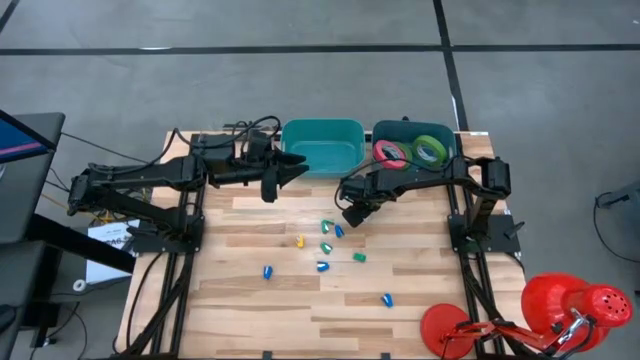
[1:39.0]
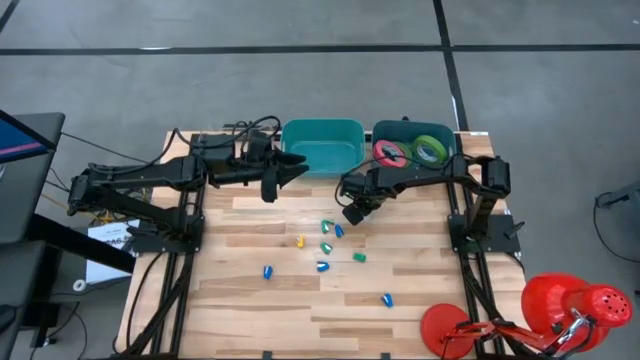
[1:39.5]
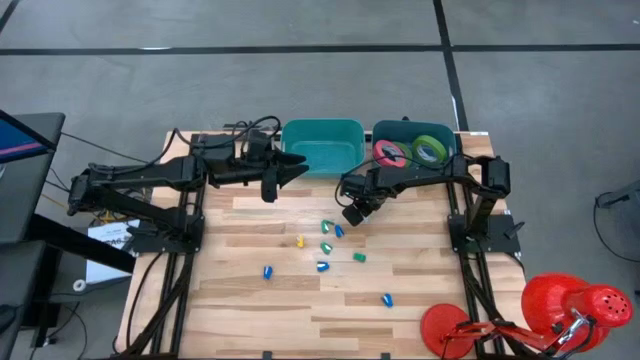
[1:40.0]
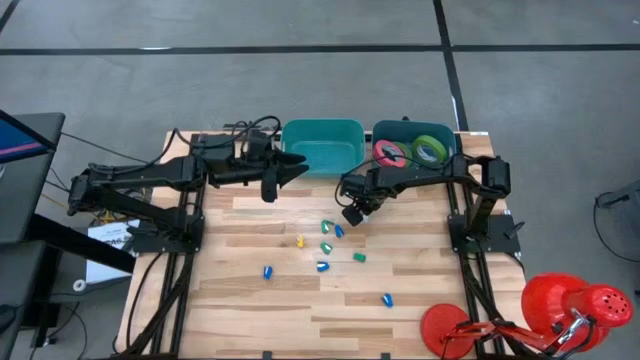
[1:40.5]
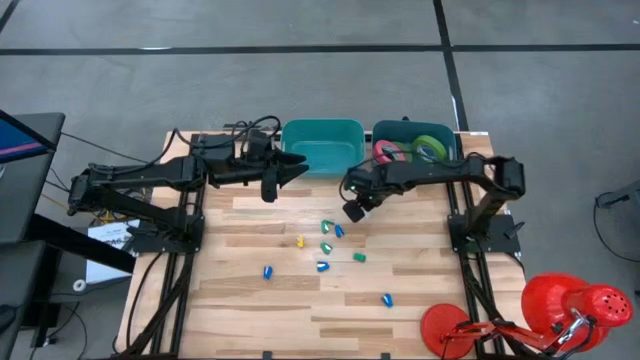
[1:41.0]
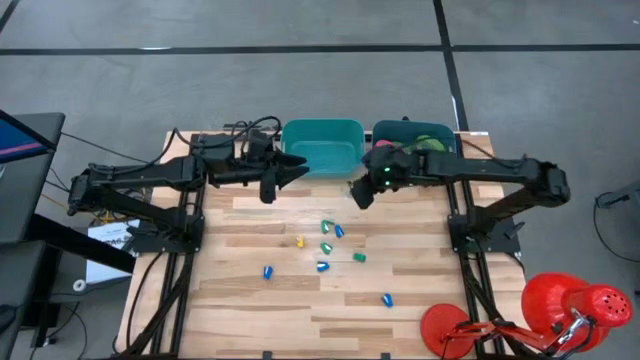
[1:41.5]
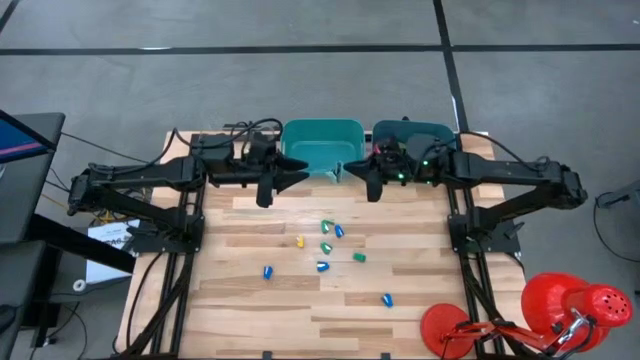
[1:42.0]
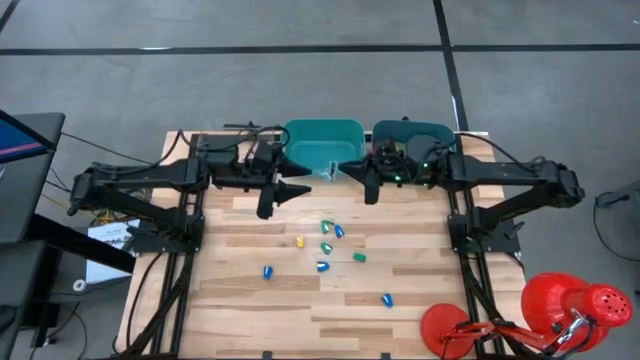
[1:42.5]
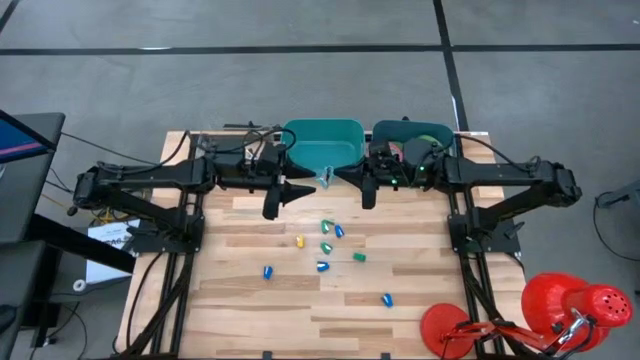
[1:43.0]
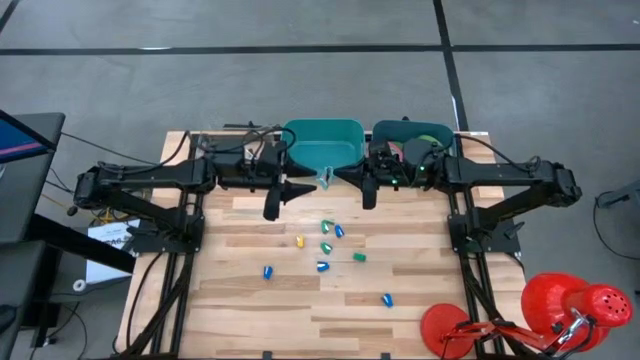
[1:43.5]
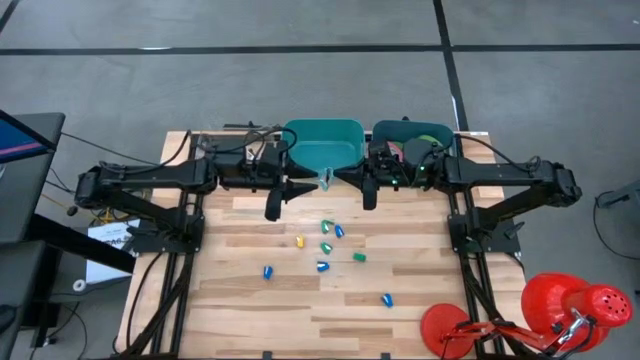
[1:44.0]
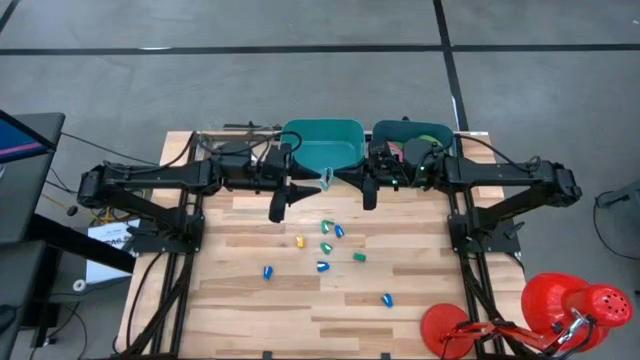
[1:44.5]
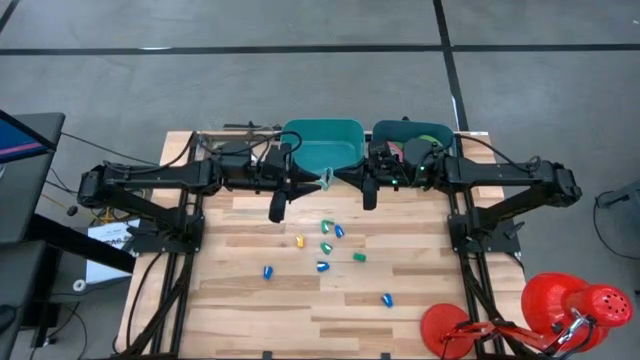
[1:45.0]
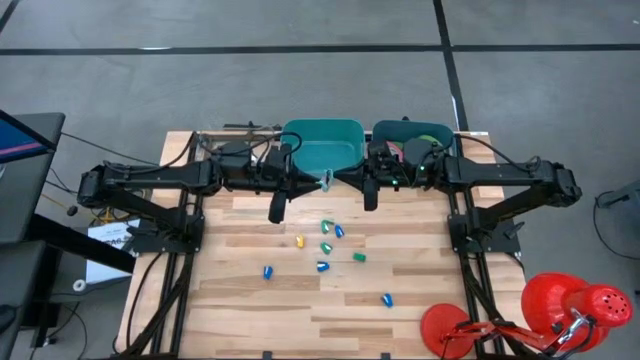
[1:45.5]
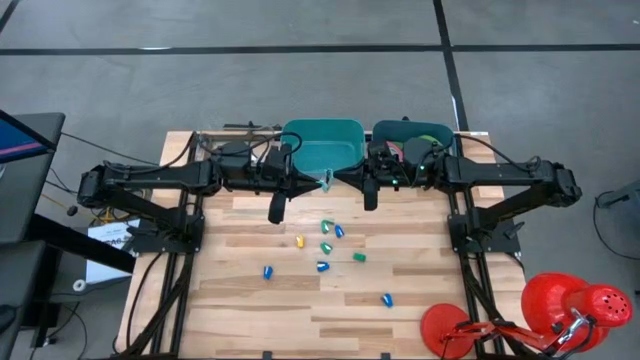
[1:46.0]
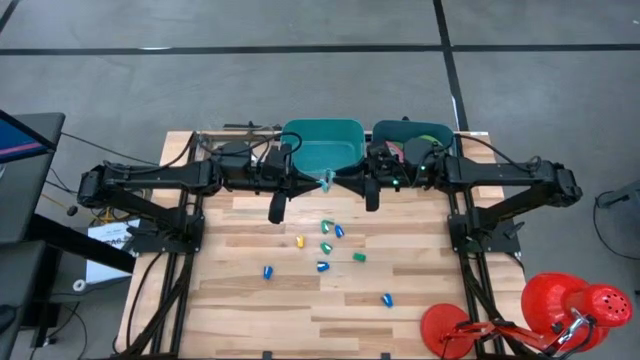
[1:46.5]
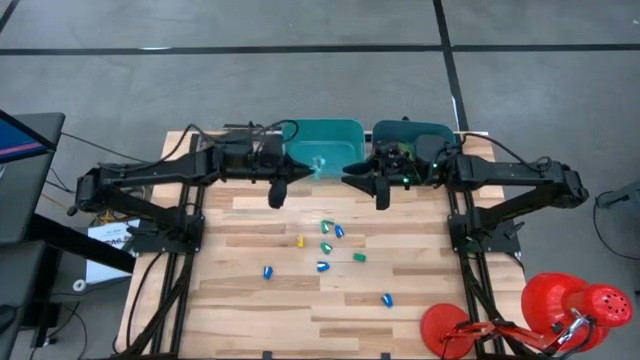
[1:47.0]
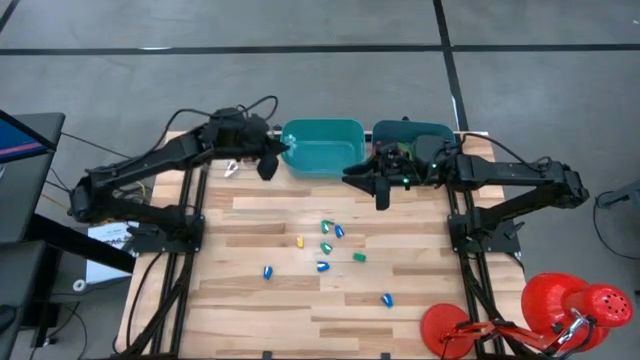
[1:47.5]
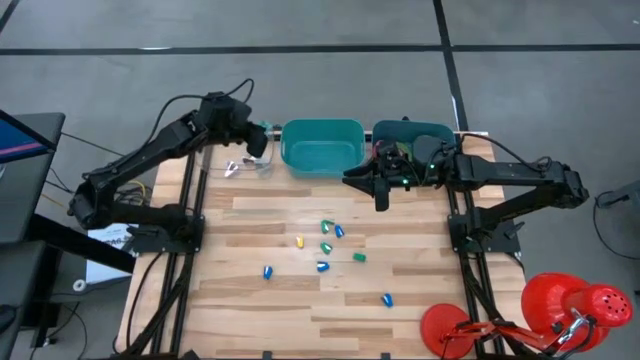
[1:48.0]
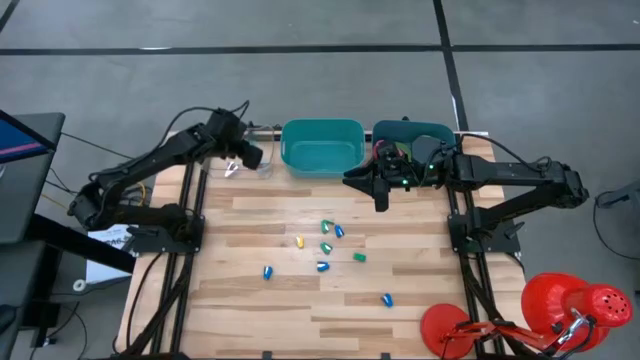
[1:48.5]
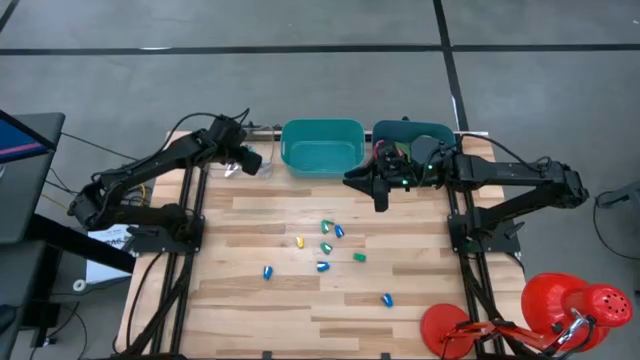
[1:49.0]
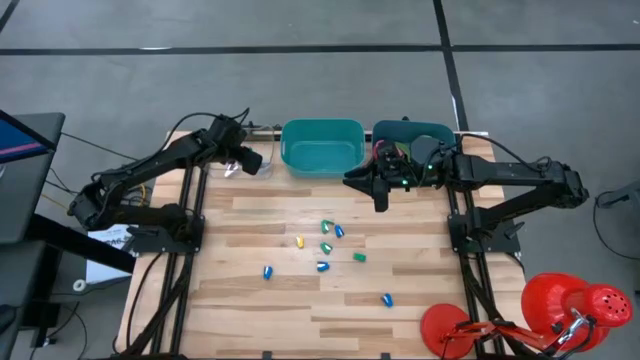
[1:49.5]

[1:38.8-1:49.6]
Task: Pick and place Stapler, Stapler remover, tape
Put the light blue staple remover into the transparent bin

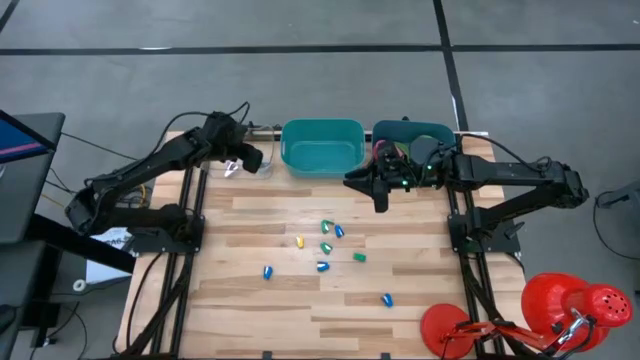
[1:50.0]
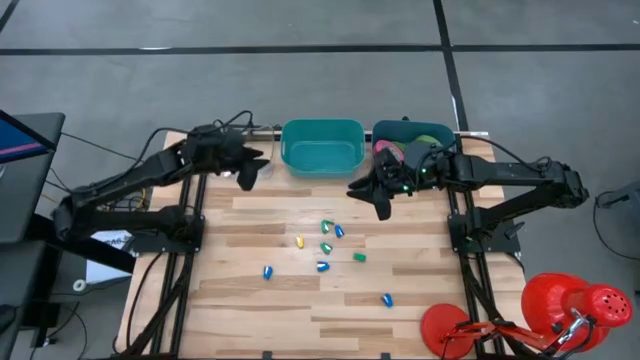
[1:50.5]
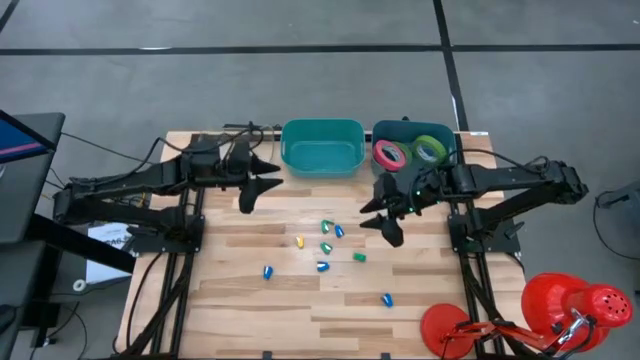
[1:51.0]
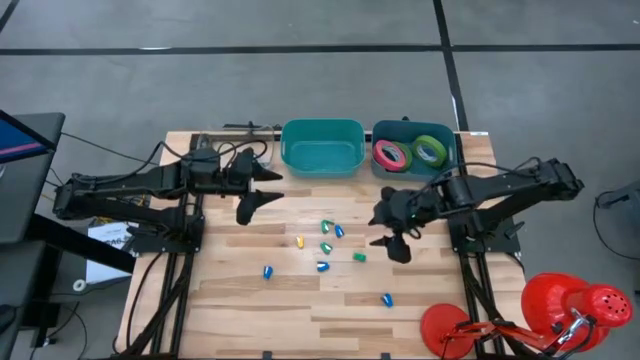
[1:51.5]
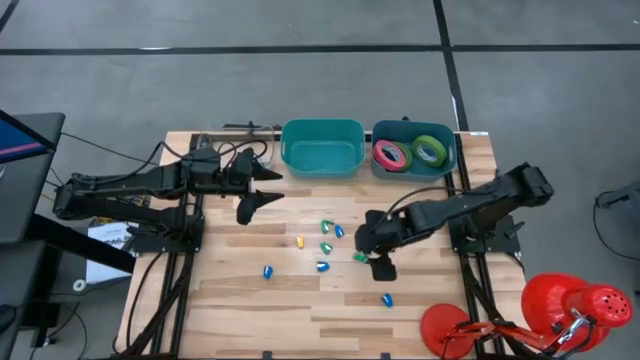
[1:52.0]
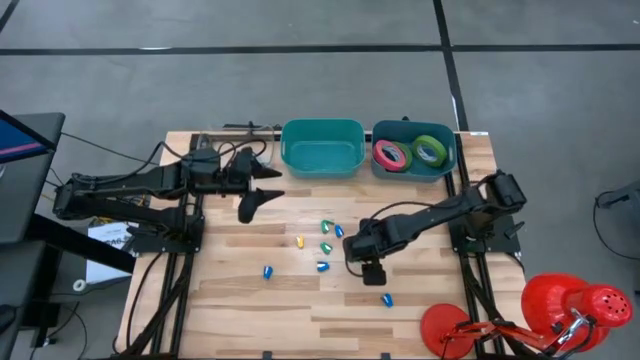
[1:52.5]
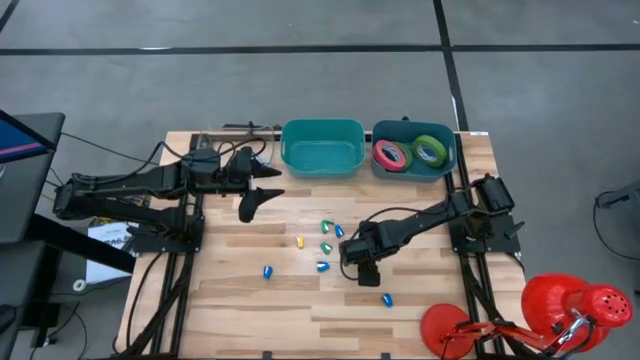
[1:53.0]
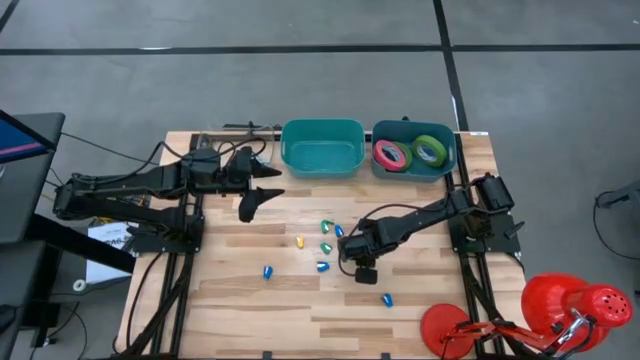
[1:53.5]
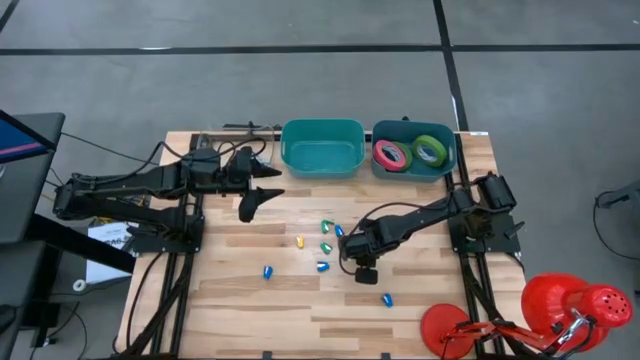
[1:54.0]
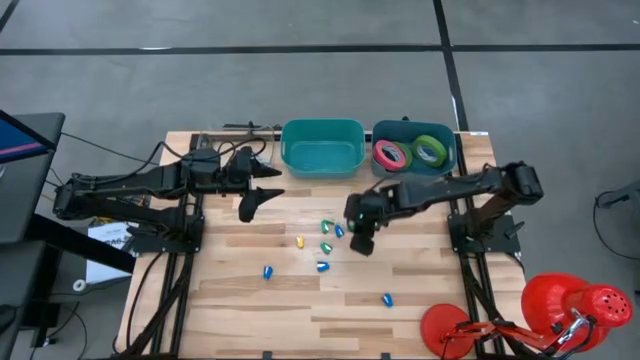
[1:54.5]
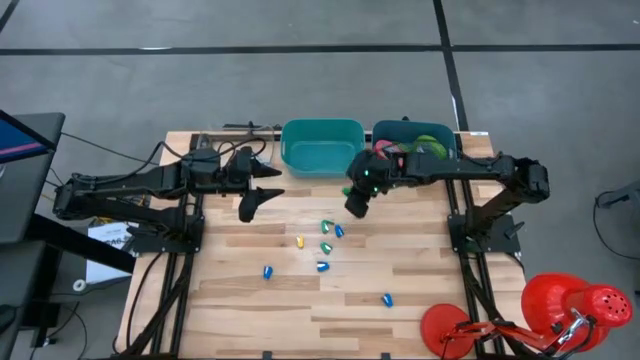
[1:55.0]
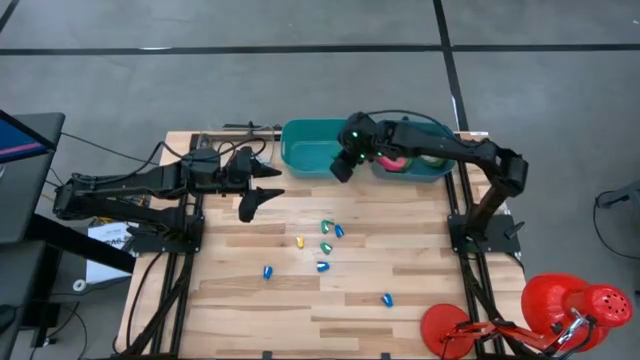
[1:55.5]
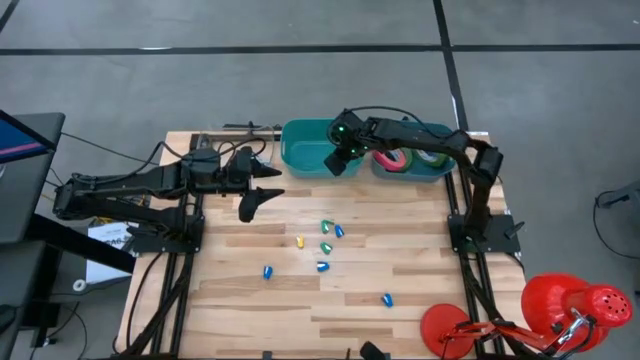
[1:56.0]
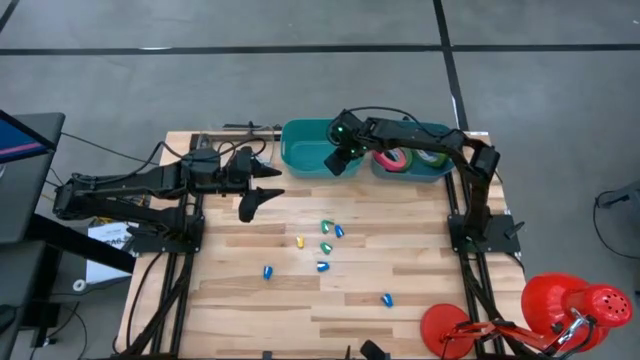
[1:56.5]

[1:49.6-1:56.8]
Put the green stapler into the green bin

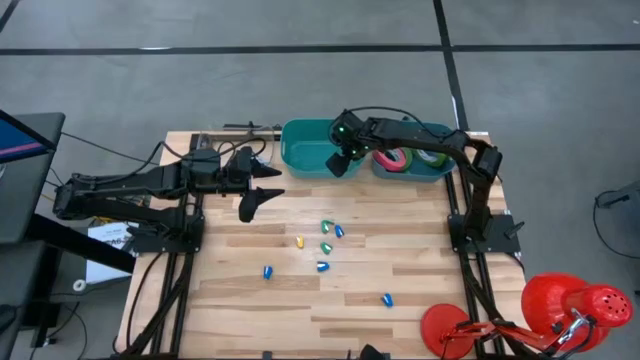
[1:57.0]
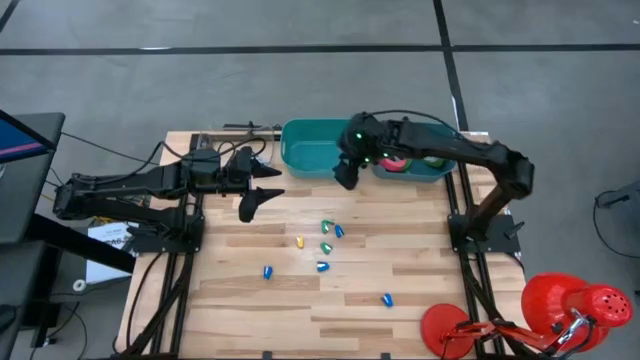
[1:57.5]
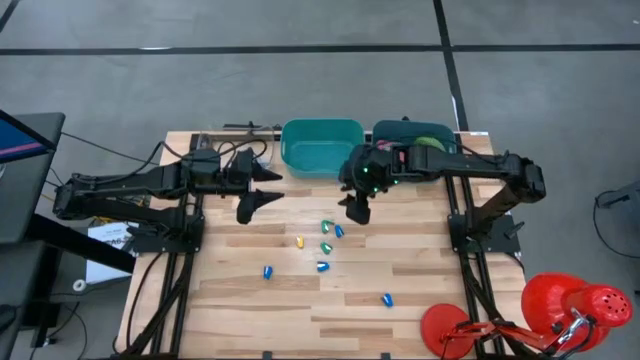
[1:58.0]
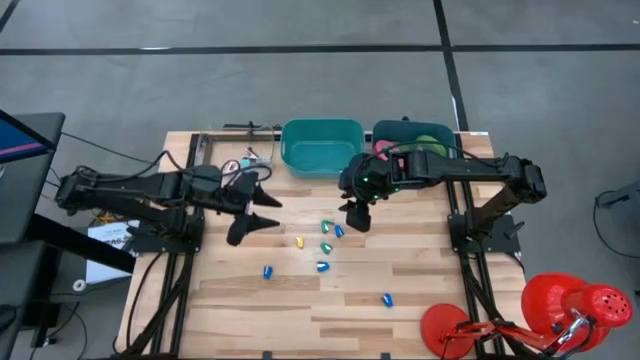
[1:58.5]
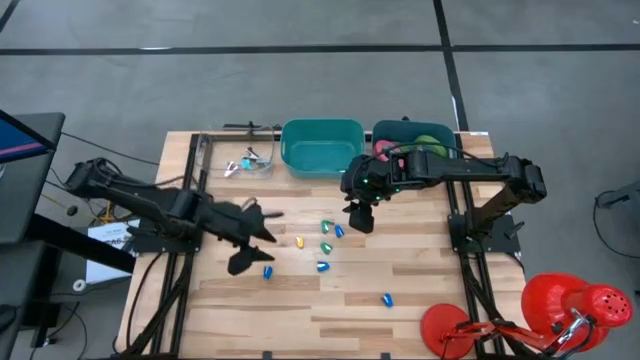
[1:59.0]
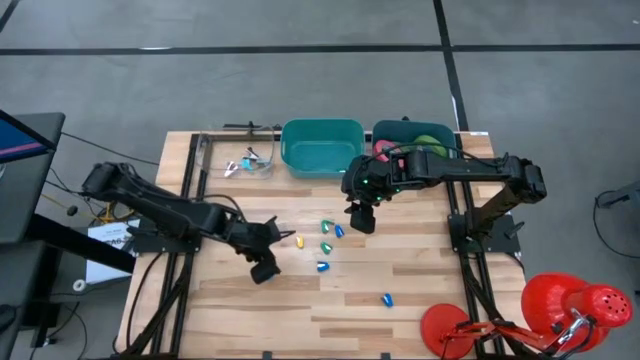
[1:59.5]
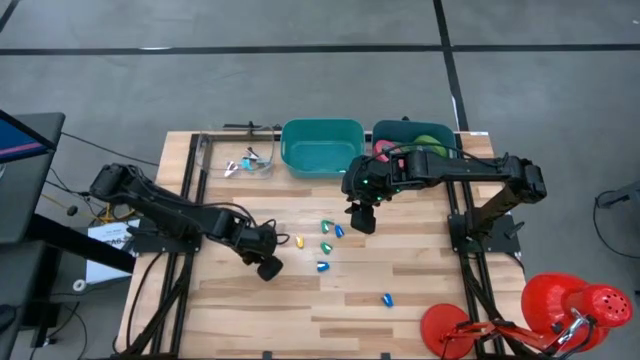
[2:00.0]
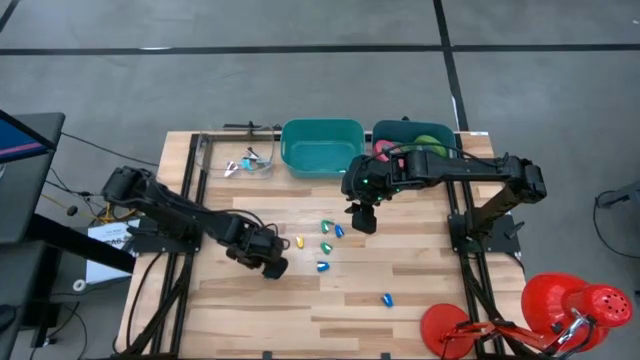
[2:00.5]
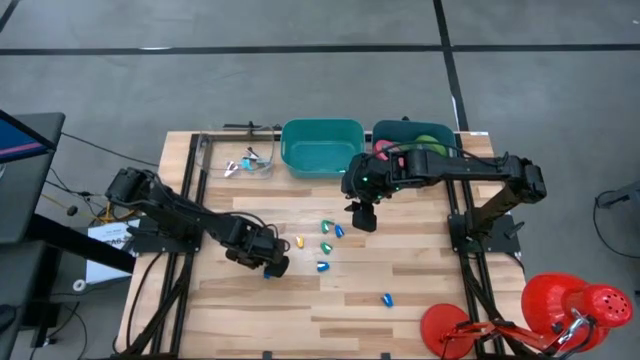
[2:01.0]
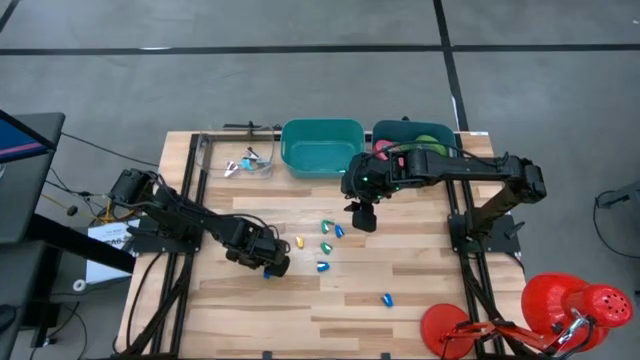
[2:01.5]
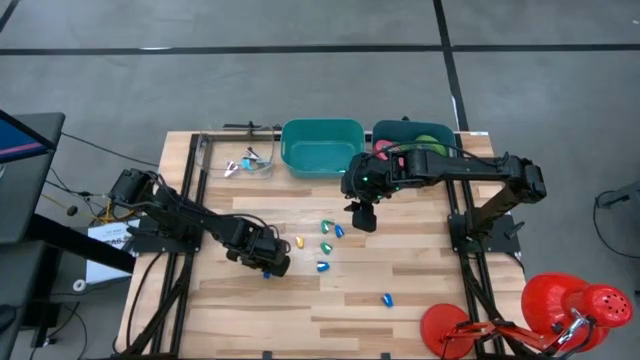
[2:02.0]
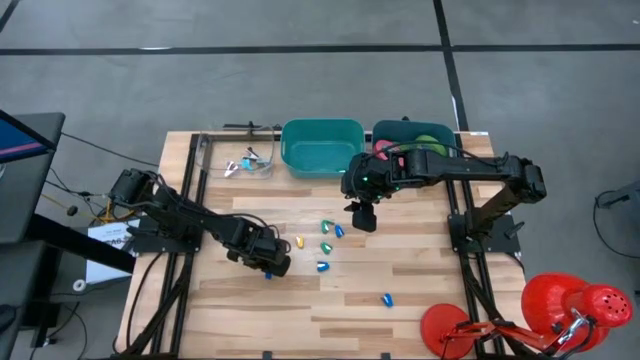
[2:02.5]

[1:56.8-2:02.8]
Put the blue stapler into the green bin
